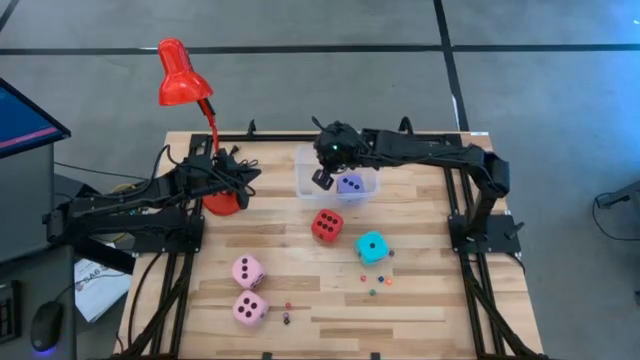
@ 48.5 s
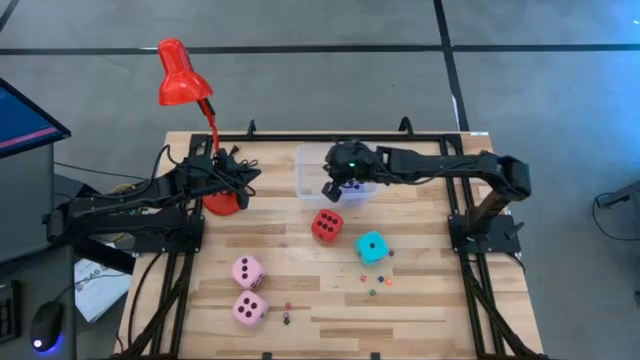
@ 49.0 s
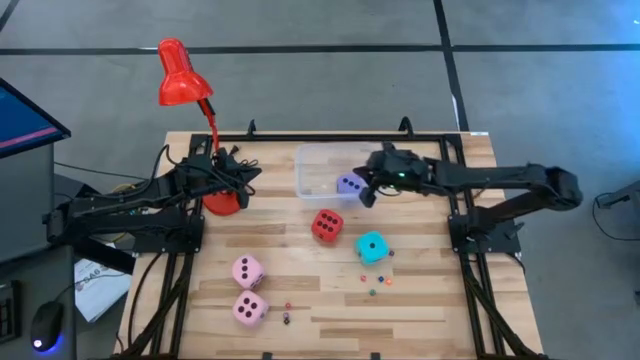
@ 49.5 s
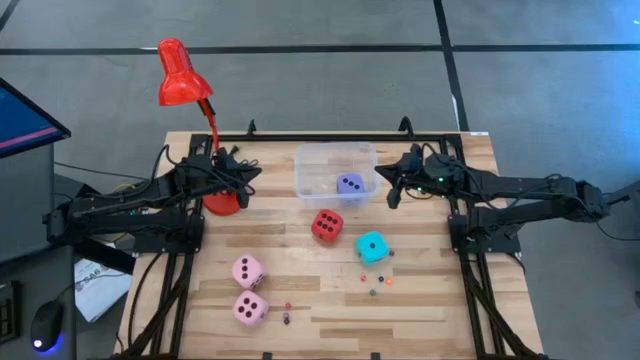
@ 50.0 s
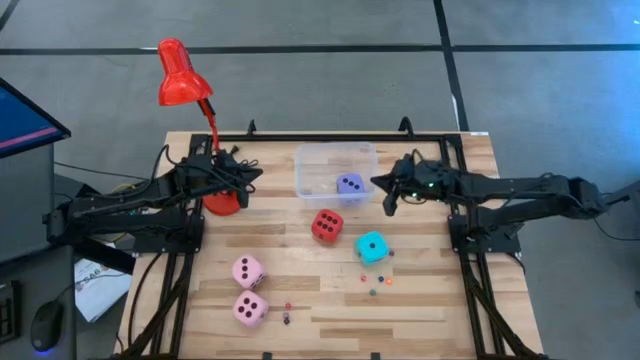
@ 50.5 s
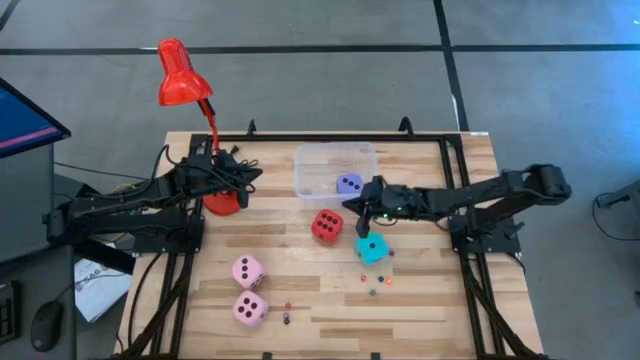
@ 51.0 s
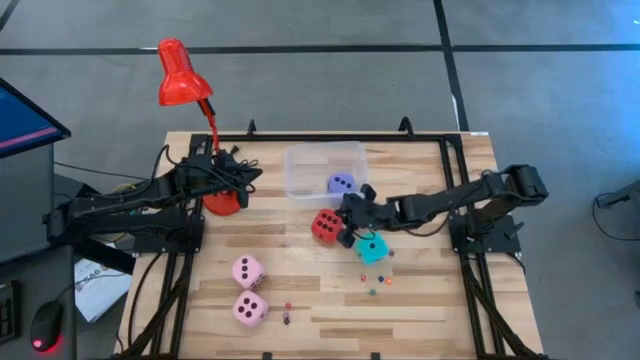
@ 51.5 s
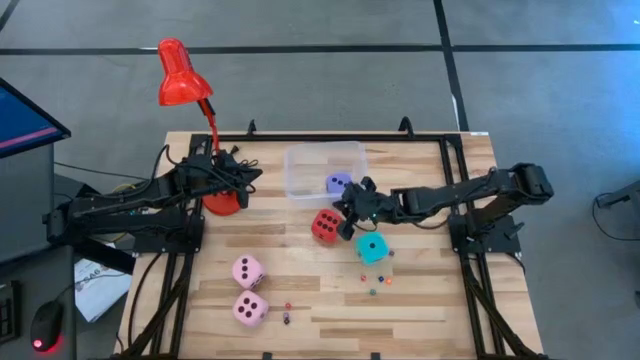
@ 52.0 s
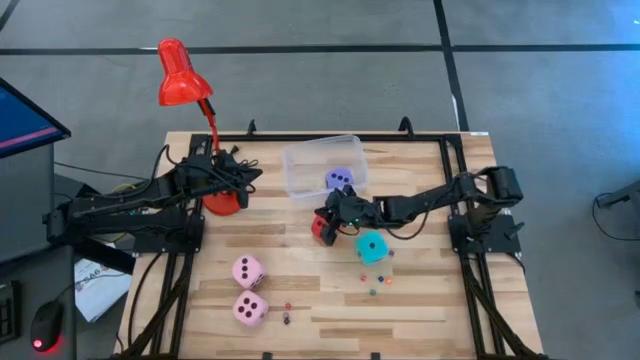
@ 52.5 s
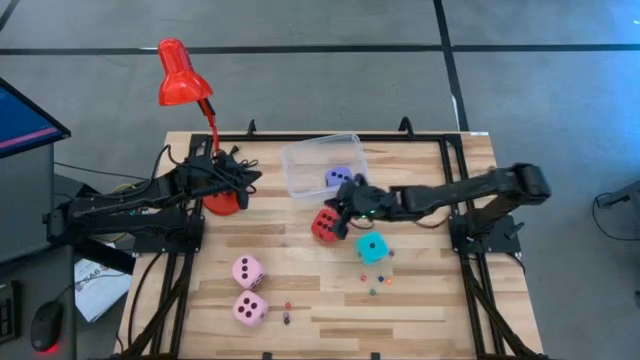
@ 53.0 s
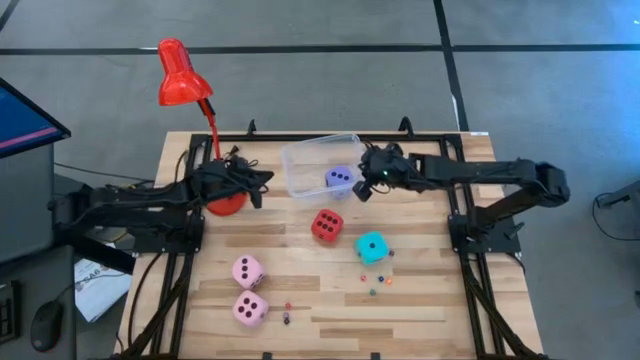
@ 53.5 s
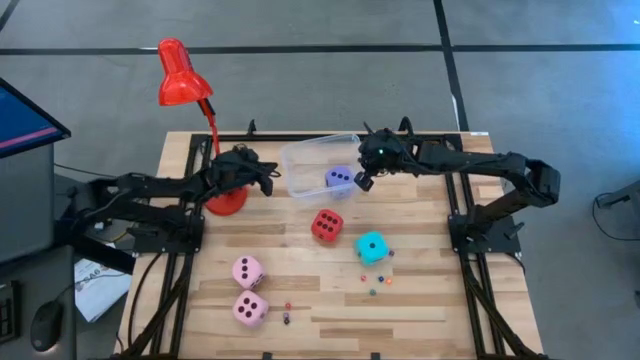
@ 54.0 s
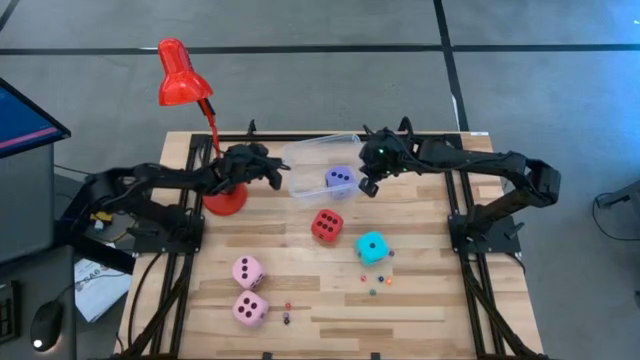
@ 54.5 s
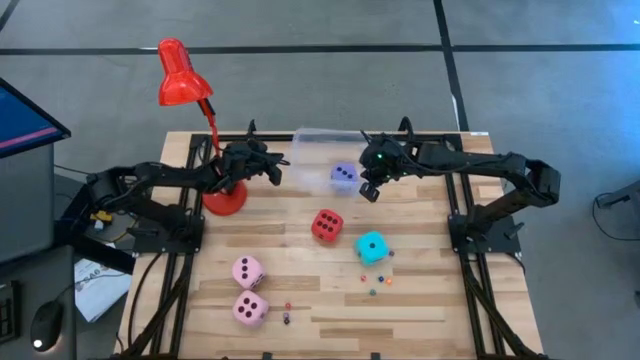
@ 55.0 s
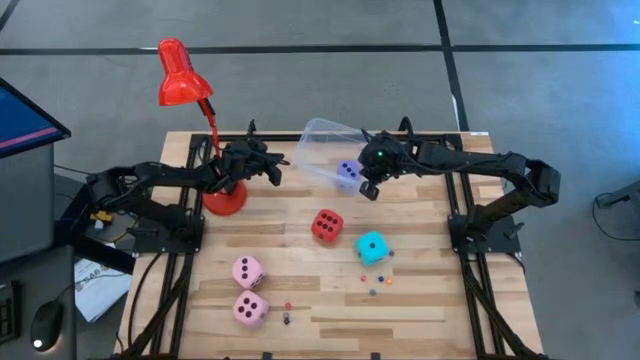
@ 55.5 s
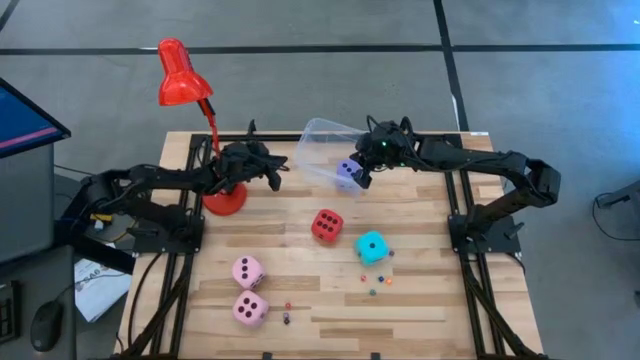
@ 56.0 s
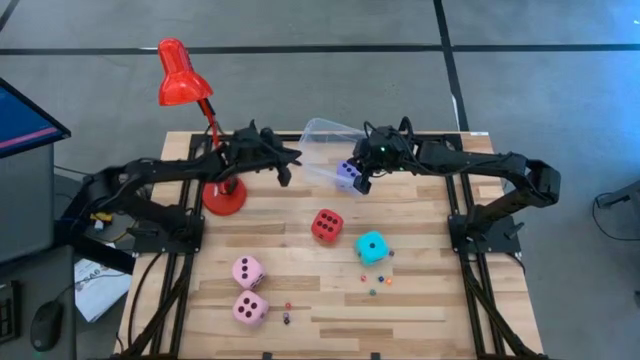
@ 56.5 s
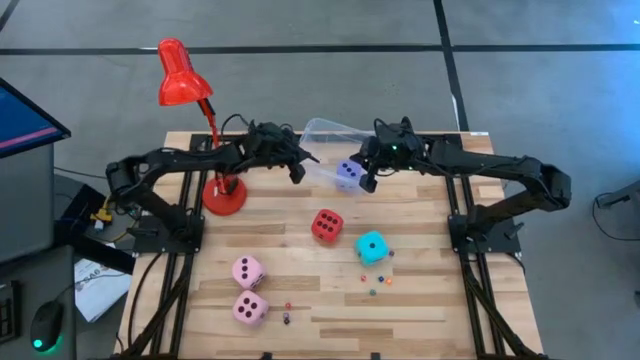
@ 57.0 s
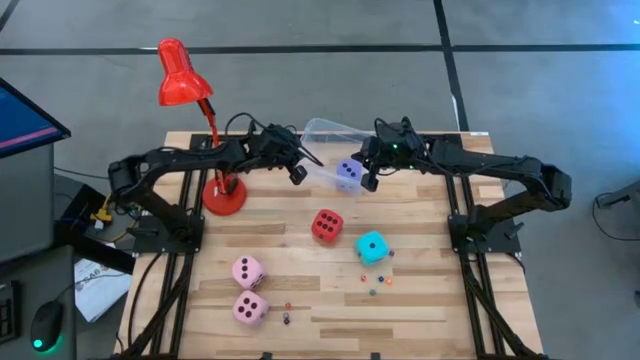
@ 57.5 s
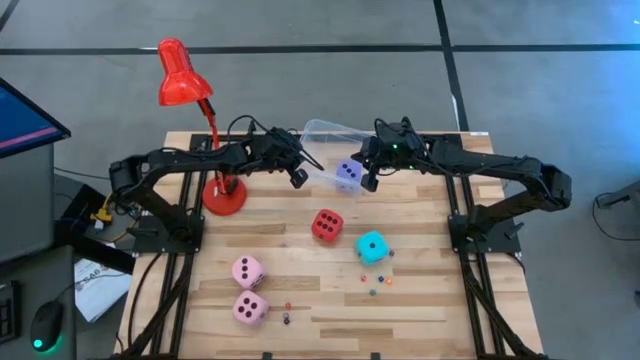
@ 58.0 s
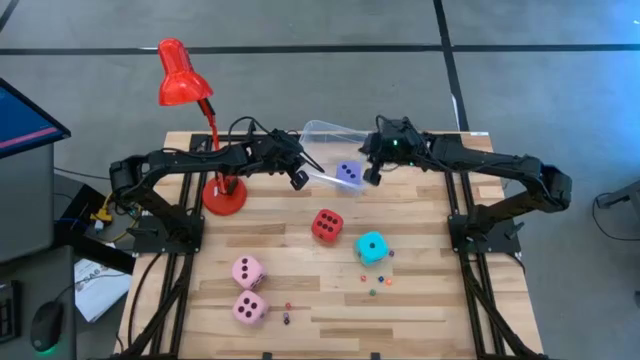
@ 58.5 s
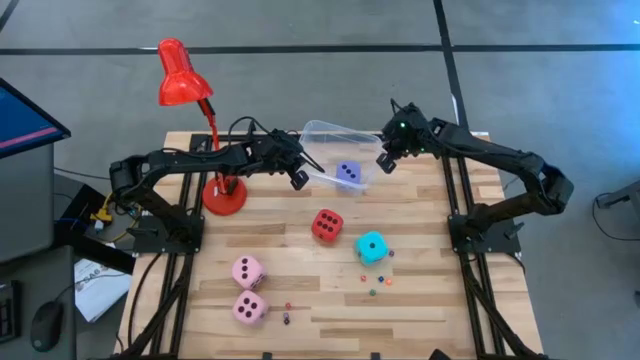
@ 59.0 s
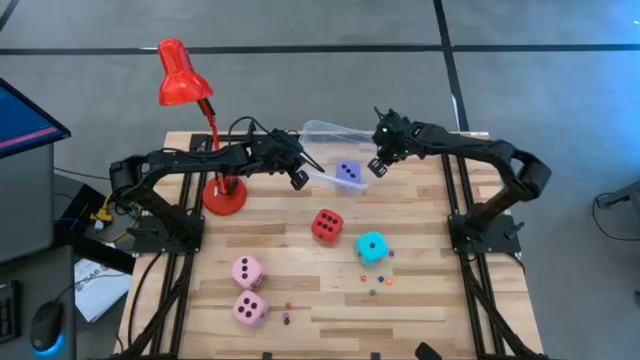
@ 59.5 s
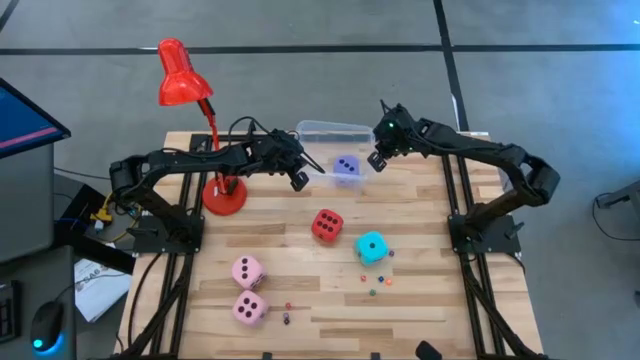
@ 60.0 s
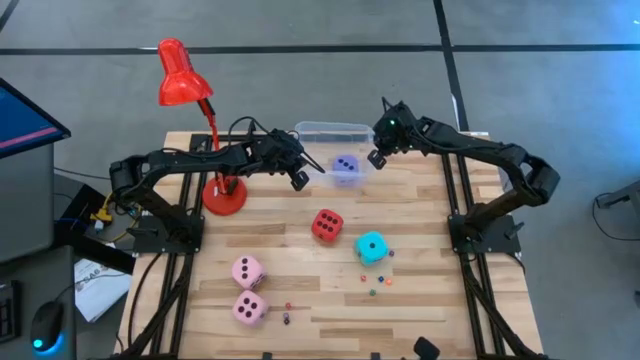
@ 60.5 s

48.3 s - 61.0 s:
Task: Pick & Place Dice
Move the transparent bin

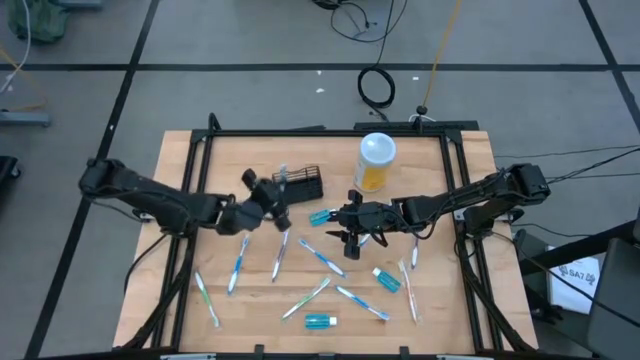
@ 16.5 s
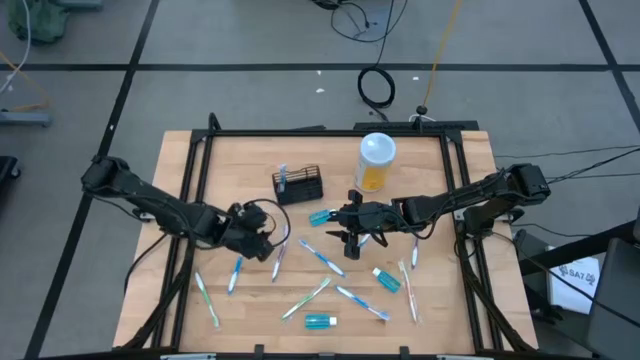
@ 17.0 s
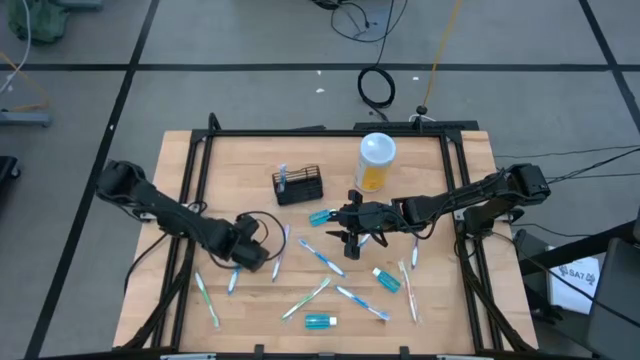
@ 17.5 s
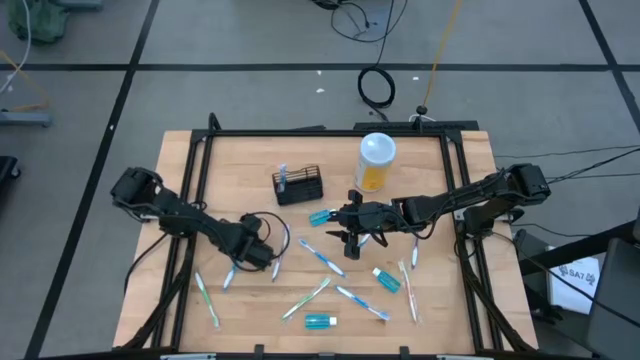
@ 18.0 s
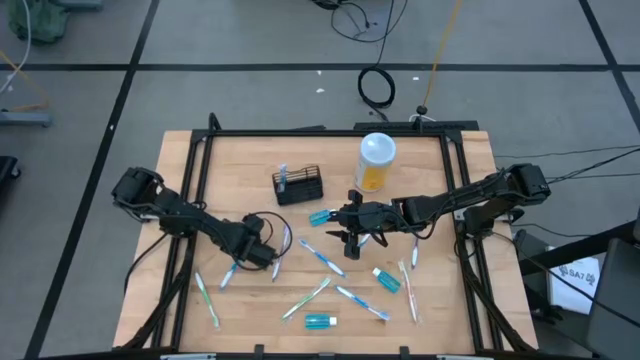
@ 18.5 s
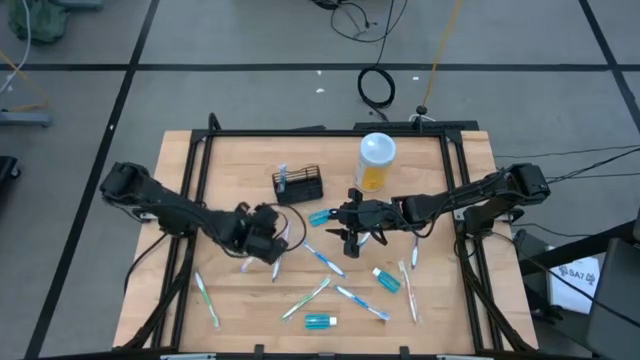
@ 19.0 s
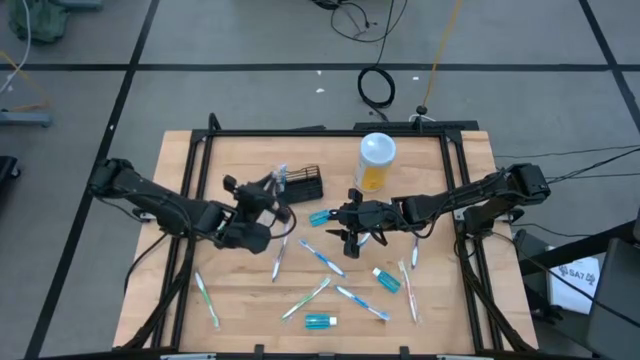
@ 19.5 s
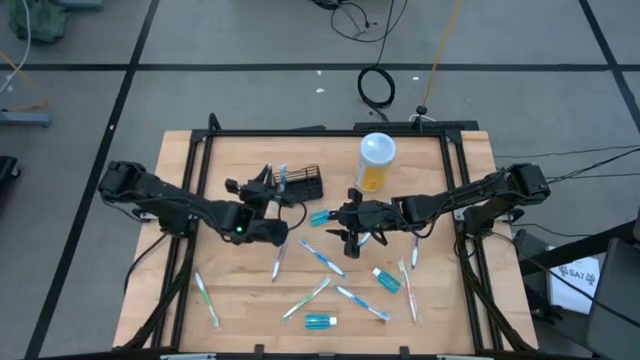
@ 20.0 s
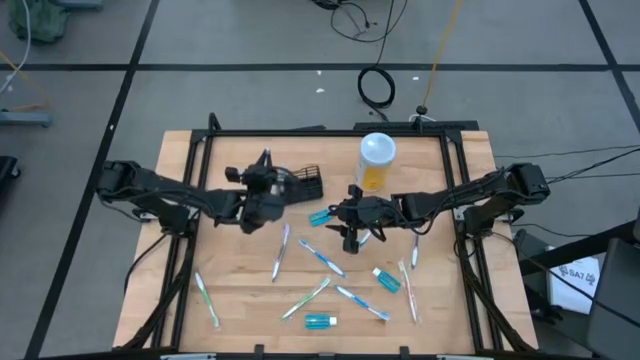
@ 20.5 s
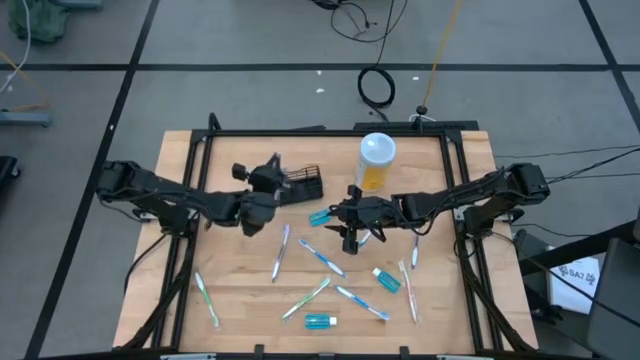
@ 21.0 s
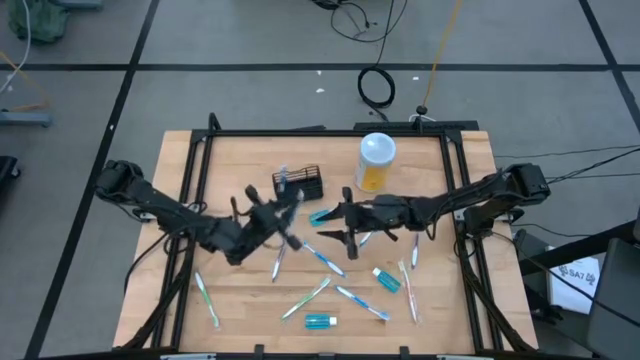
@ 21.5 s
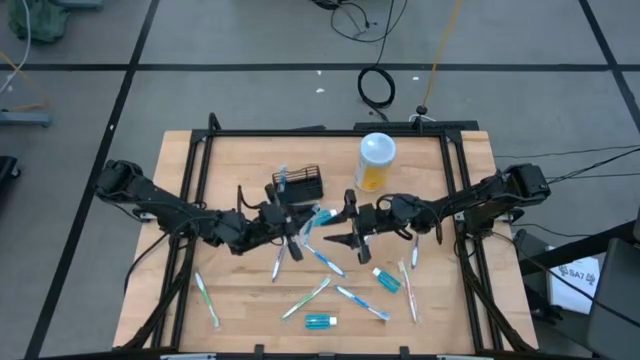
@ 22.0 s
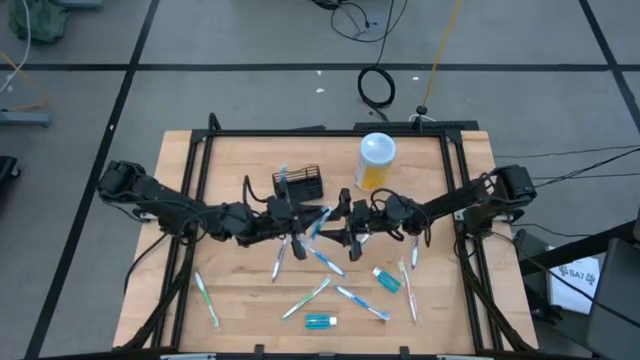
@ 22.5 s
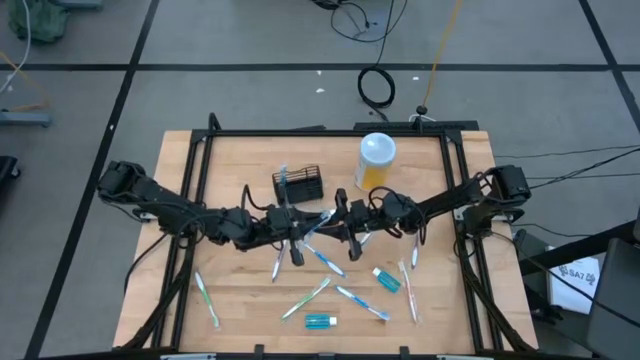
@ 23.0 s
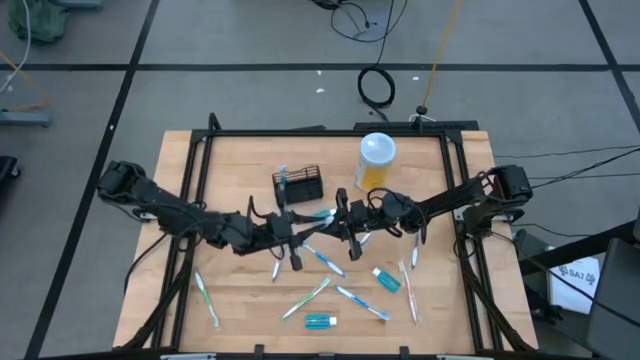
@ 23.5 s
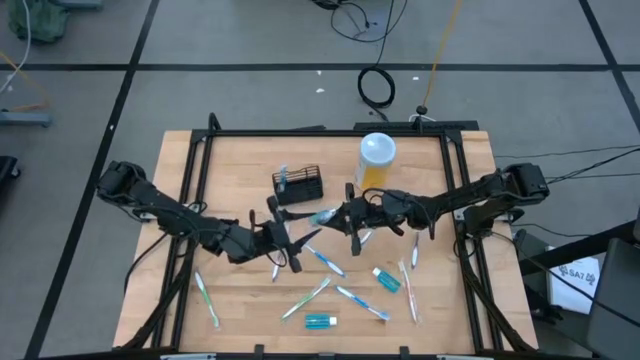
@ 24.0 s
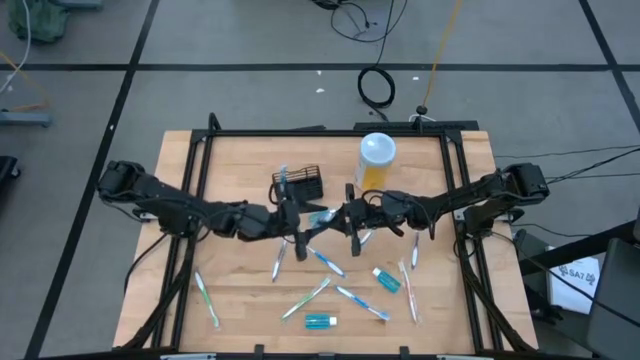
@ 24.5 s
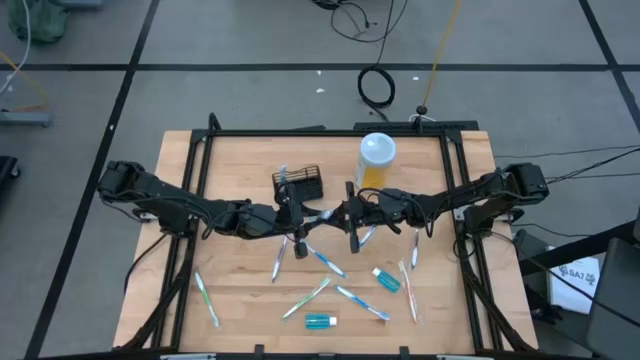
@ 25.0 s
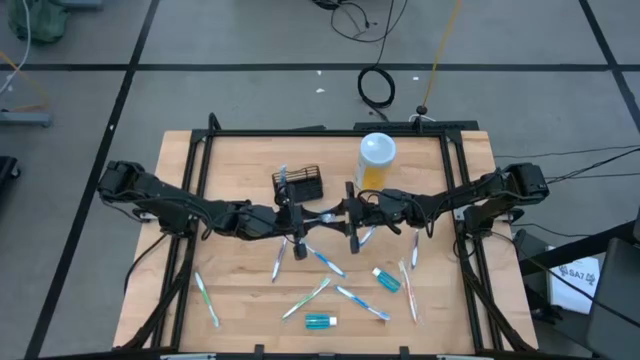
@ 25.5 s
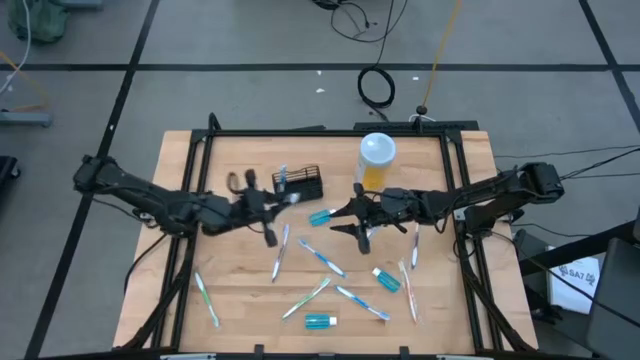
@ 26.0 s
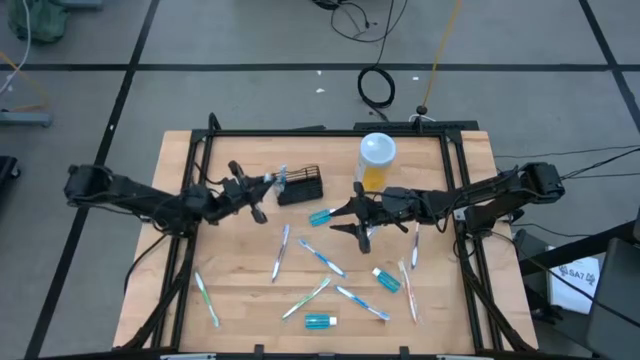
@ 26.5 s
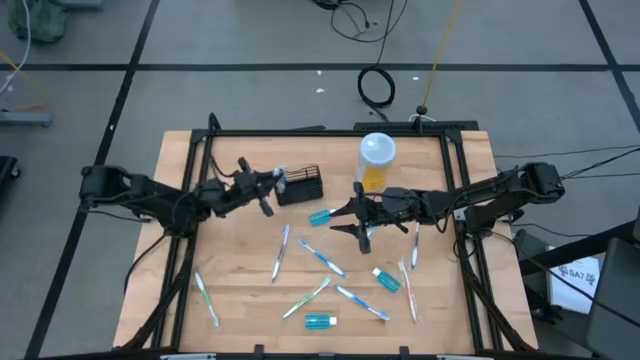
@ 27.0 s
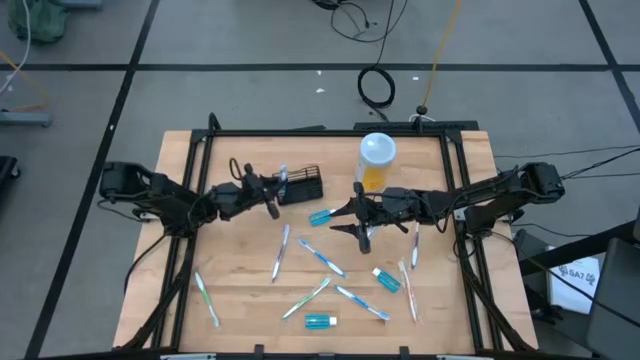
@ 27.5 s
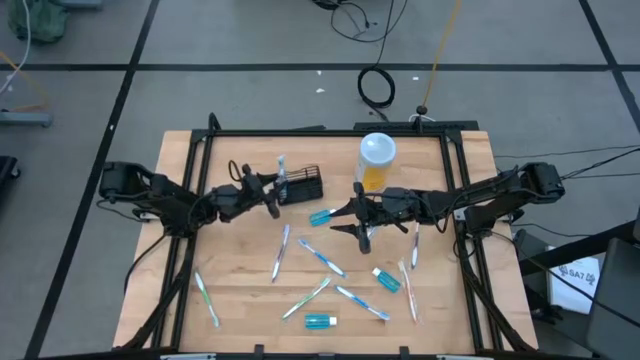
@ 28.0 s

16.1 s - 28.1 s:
Task: Pick & Place toothbrushing station
Put the blue toothbrush into the black mesh organizer
